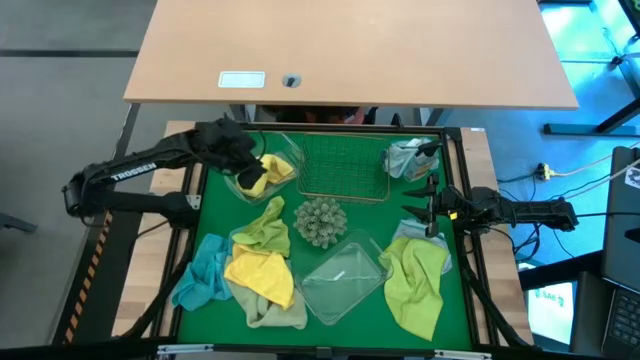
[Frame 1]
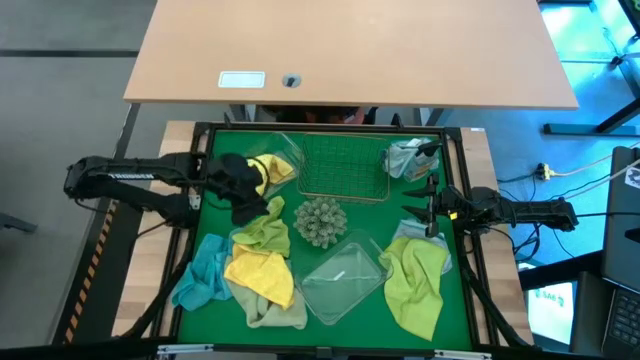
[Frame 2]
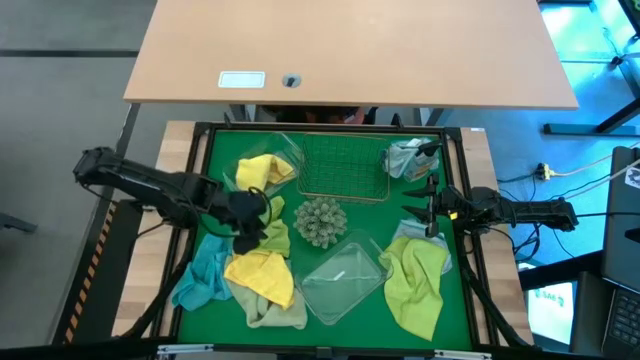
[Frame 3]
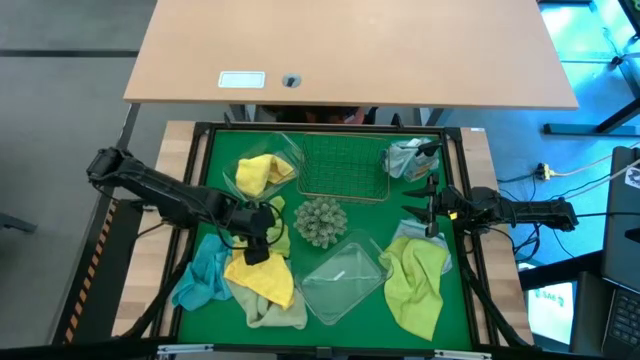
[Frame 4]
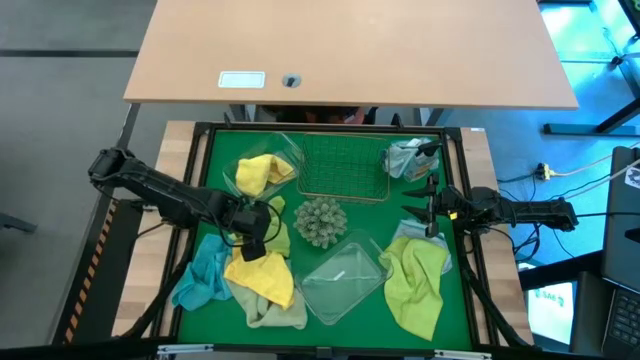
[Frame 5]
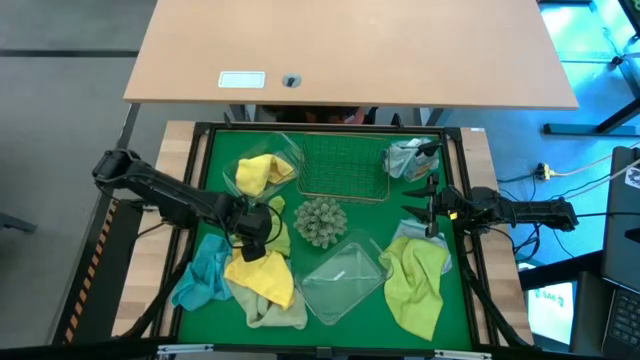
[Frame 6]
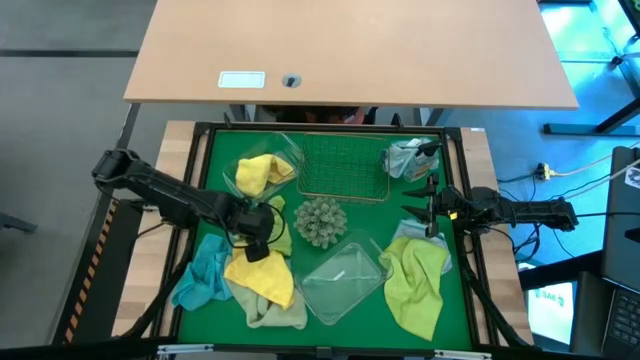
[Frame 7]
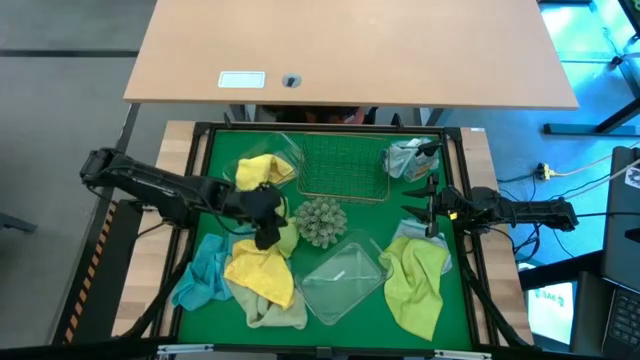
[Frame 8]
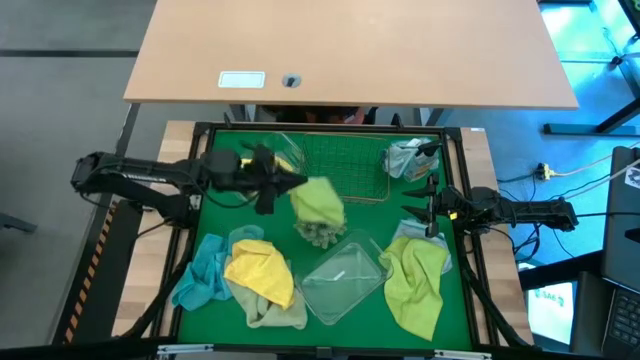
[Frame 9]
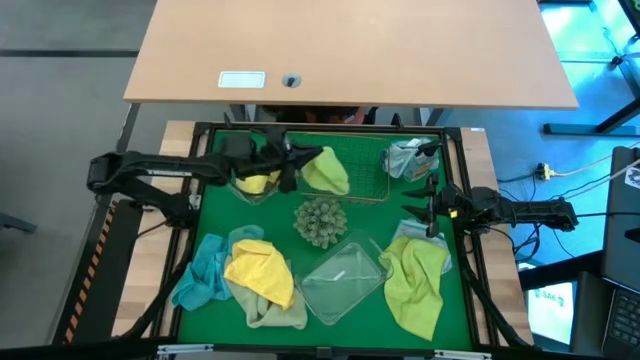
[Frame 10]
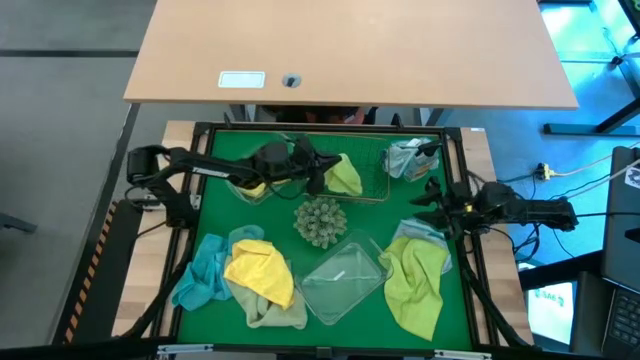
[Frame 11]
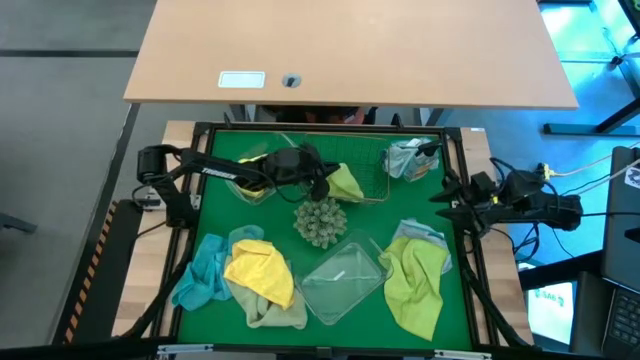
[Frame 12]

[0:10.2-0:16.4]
Task: Sort microfiber towel by color & place in baskets
Put the left light green microfiber towel into the wire basket

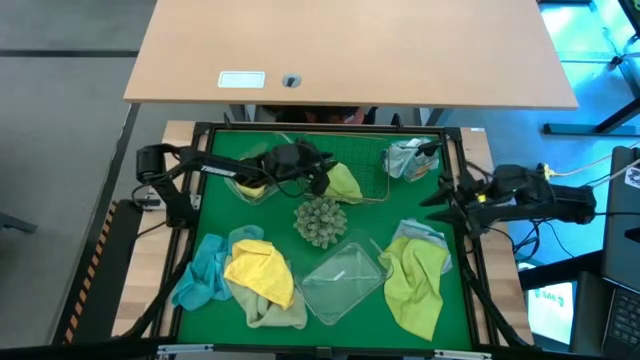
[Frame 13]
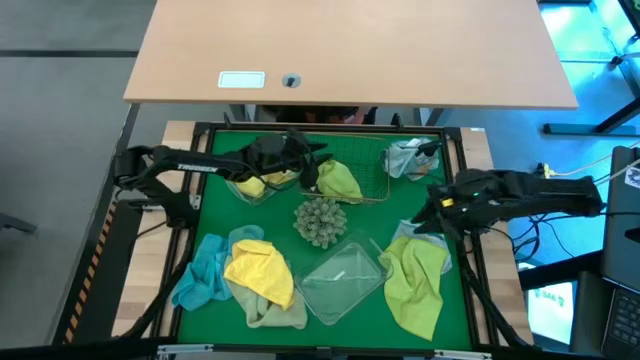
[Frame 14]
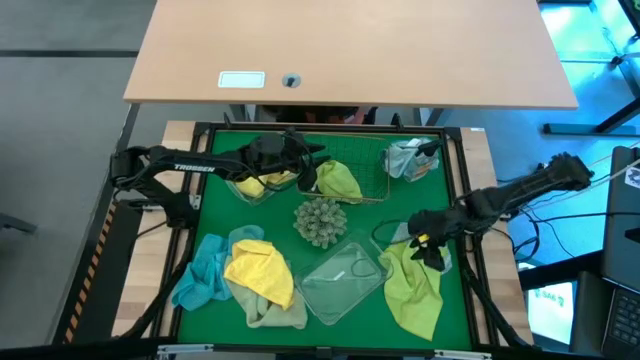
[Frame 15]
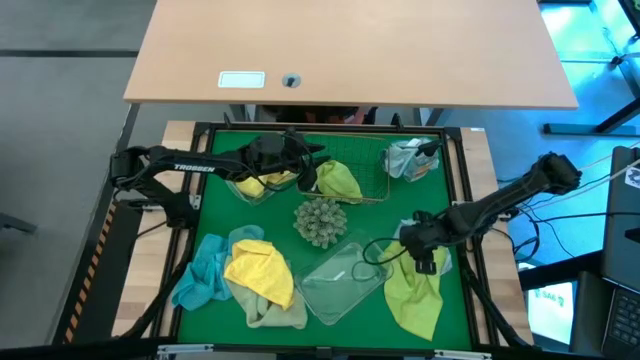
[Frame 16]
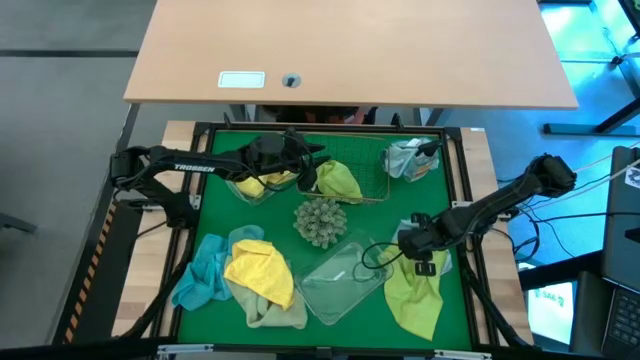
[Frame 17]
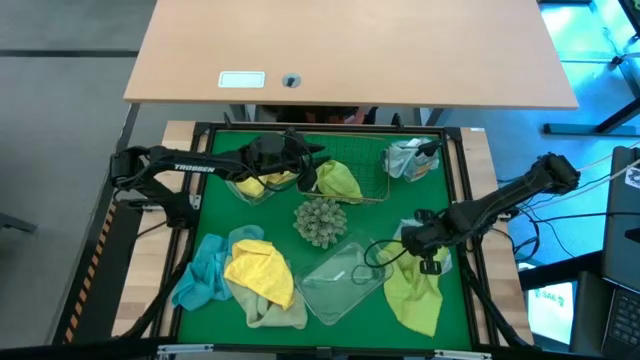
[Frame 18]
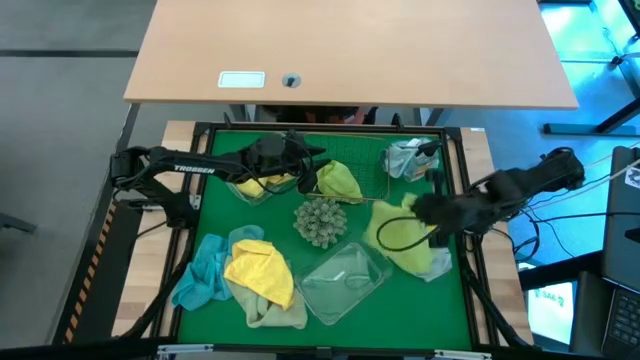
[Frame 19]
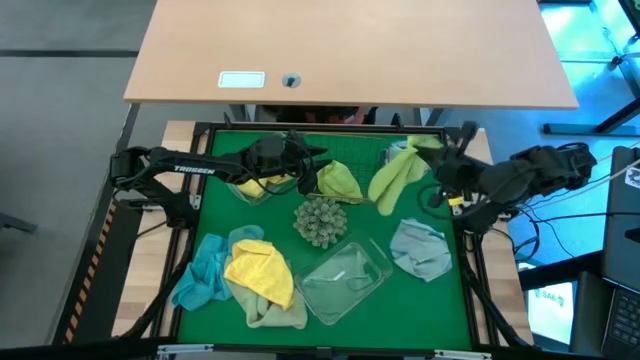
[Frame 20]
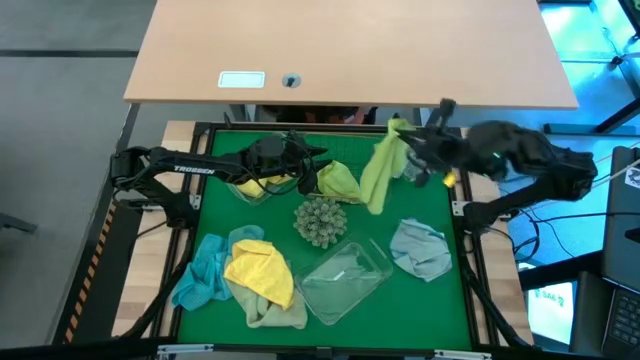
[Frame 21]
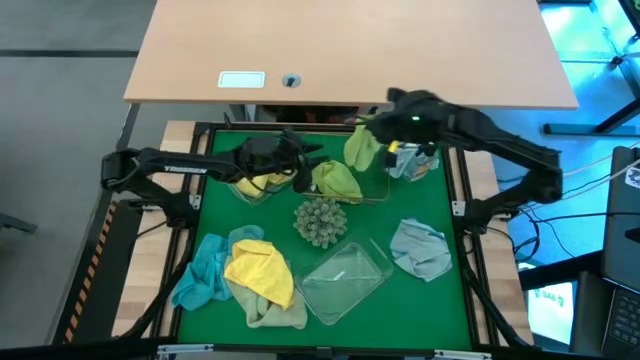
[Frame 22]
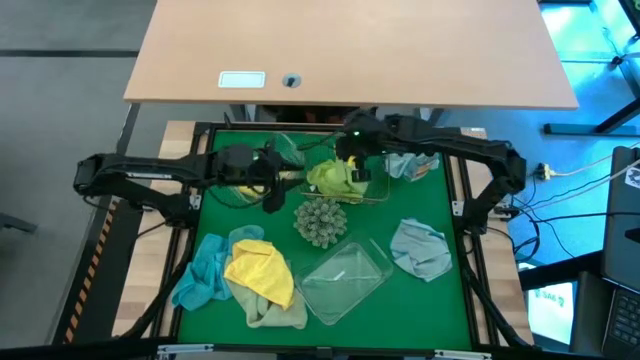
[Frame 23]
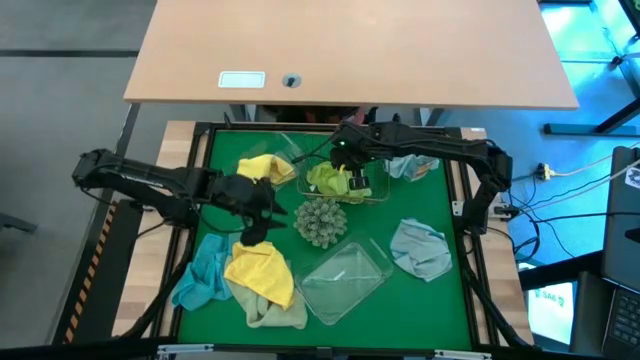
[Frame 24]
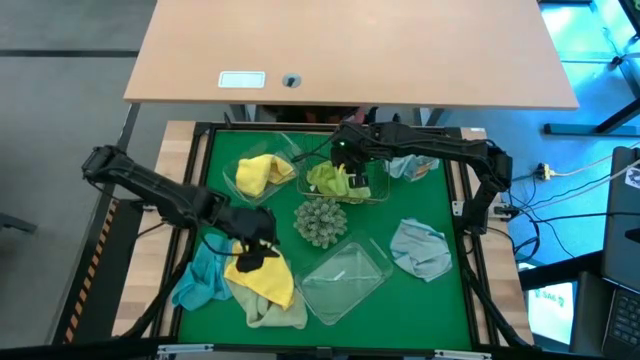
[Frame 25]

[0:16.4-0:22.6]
Put the light green microfiber towel into the wire basket

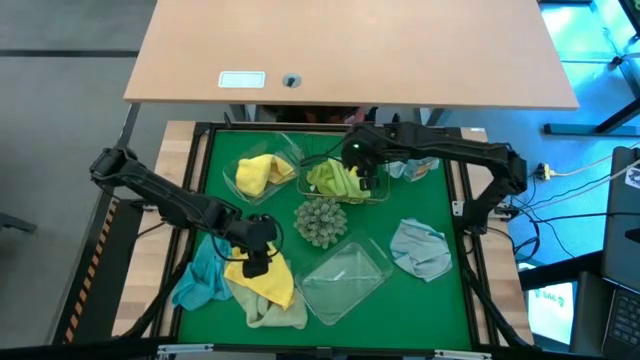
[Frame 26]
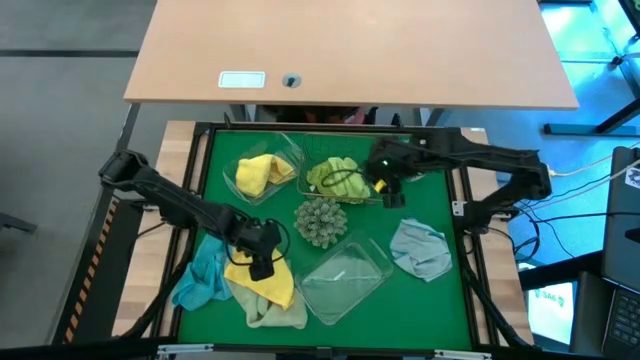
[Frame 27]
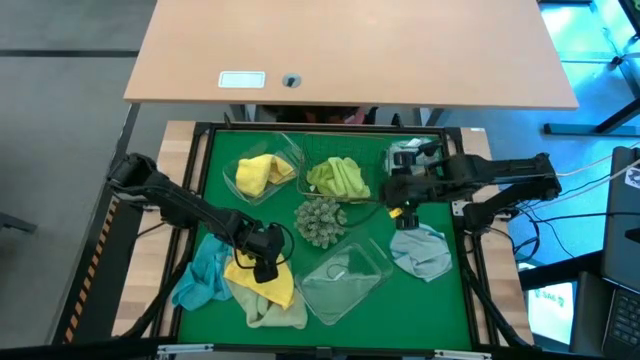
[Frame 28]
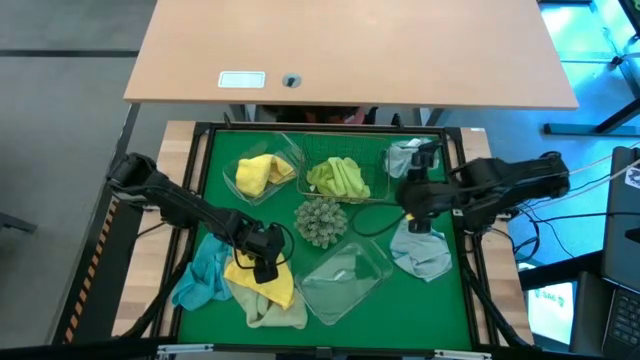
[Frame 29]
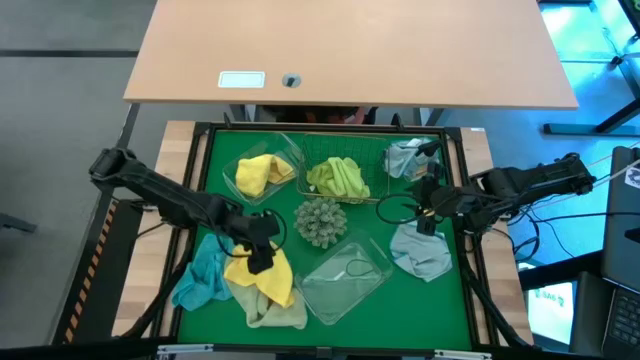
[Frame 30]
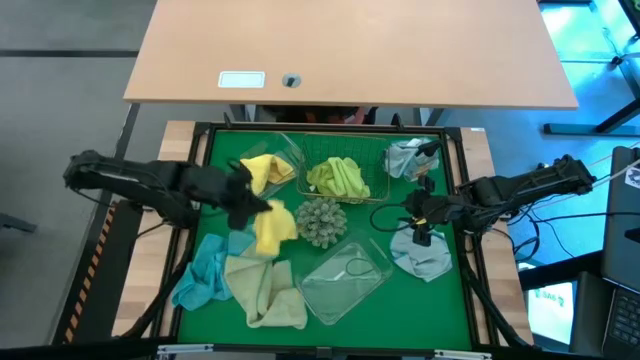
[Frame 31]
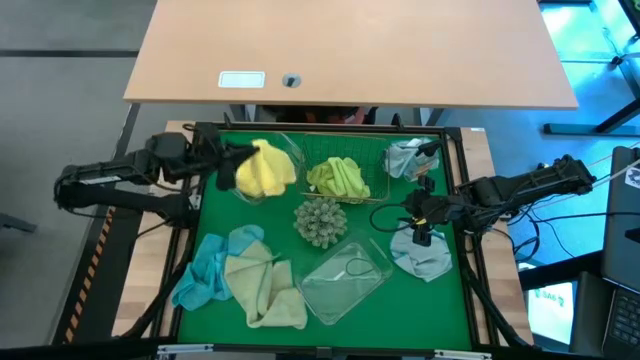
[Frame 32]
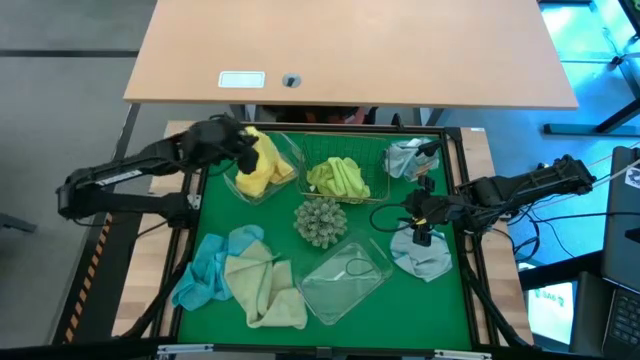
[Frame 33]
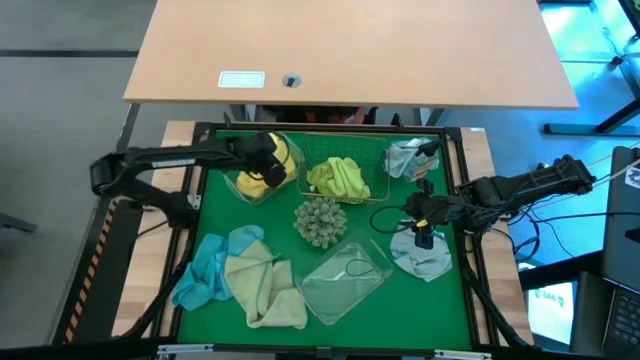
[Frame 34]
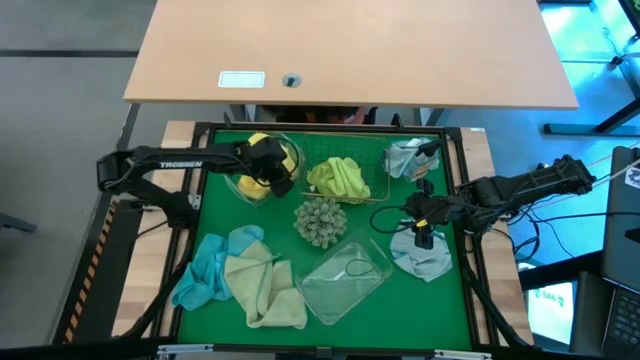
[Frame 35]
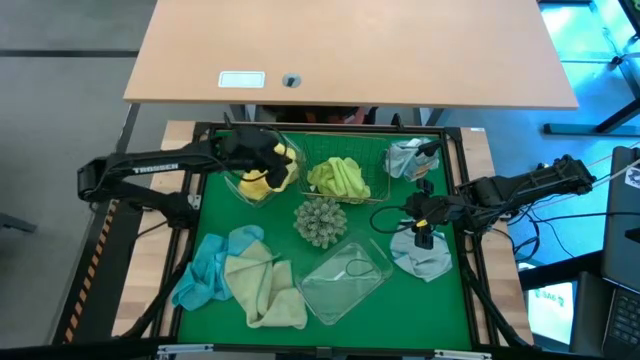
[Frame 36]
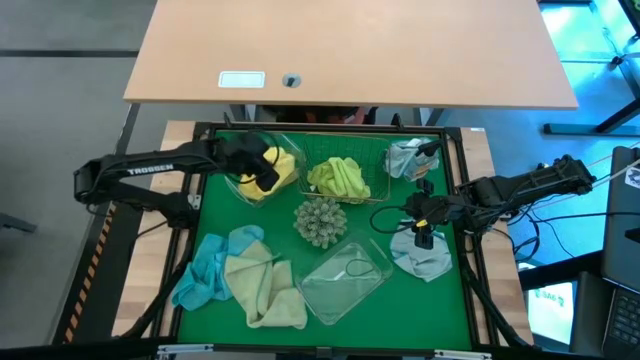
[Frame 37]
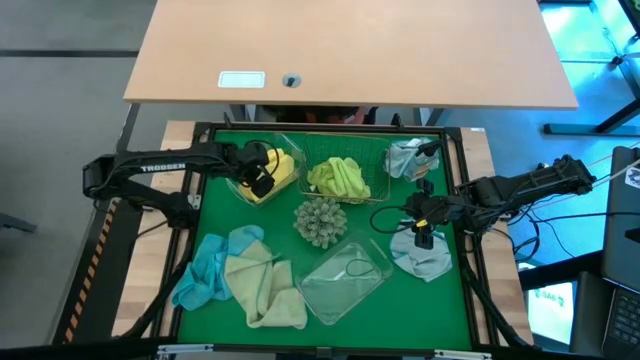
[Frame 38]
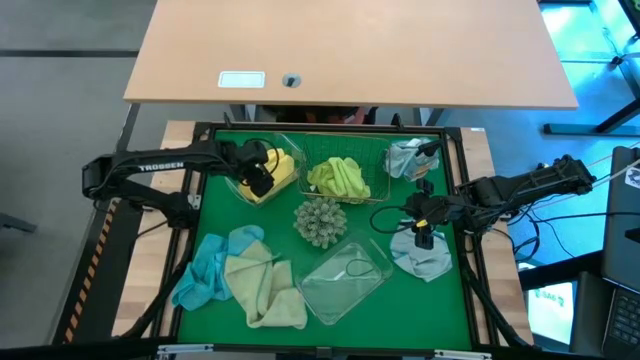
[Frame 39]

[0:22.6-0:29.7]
Put the yellow microfiber towel into the top transparent bin

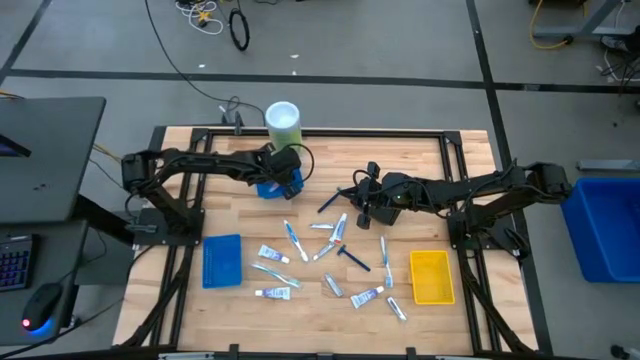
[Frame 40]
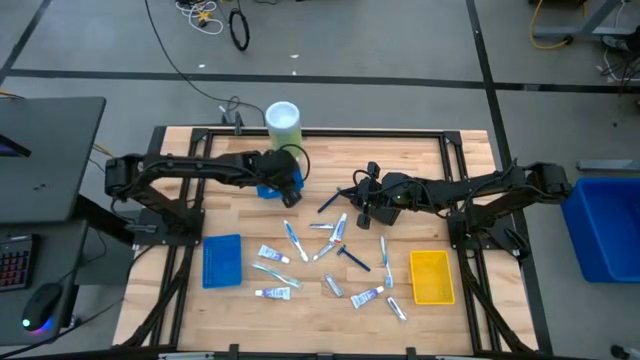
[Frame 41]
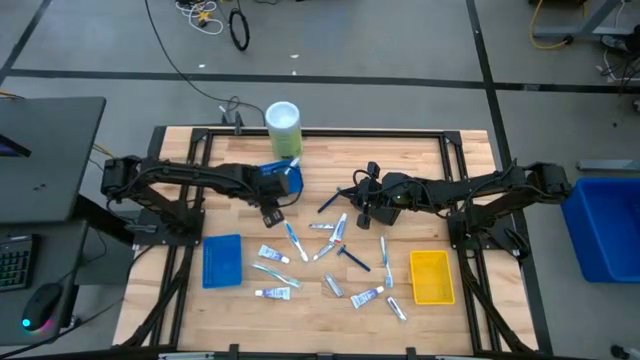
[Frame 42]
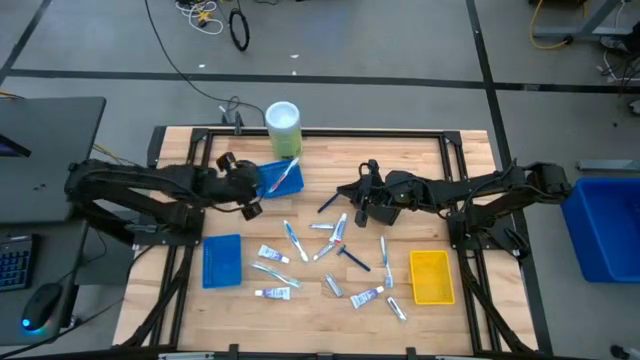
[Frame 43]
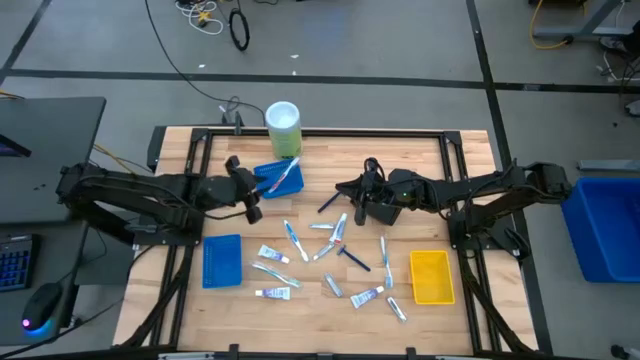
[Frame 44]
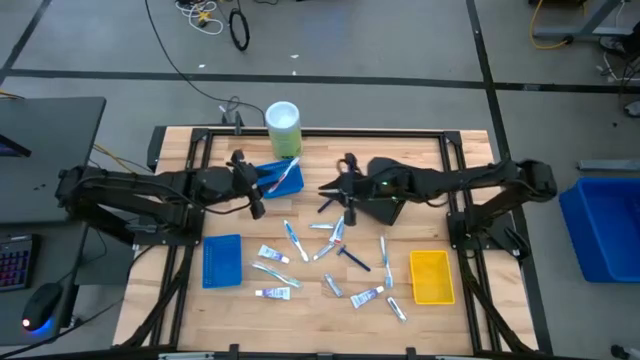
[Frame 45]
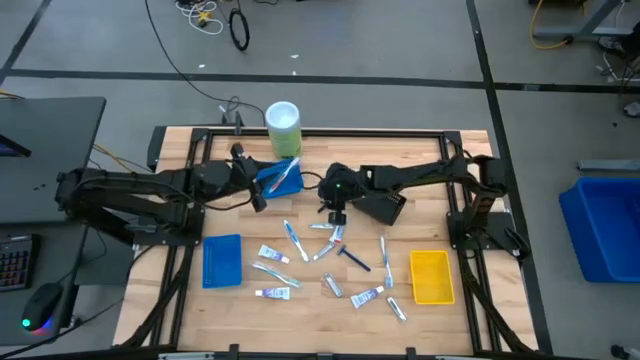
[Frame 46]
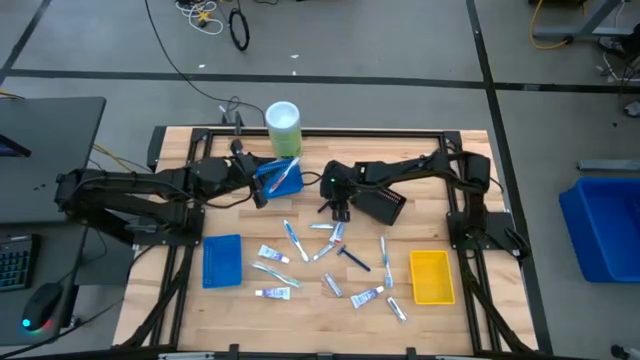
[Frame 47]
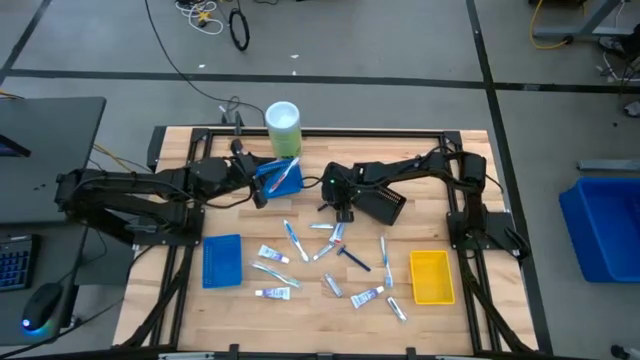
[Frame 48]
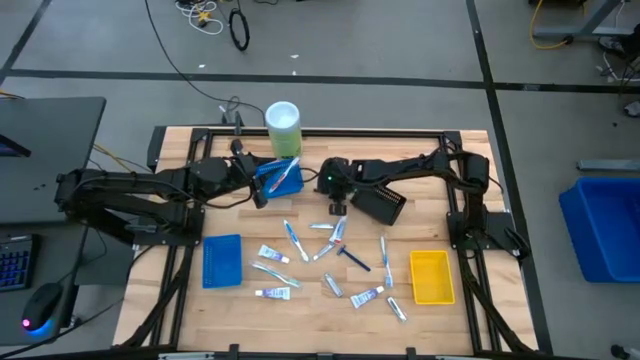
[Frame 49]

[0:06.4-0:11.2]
Task: Pick & Place Travel size toiletries
Put the blue razor into the black bin
